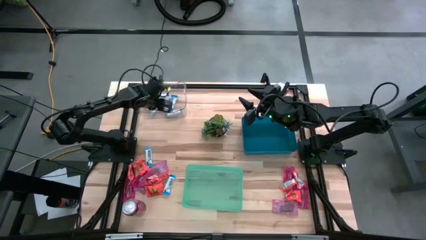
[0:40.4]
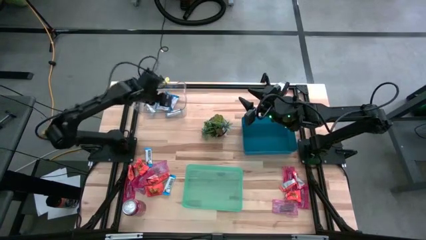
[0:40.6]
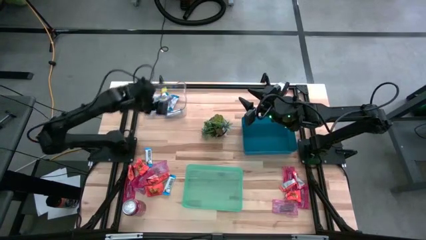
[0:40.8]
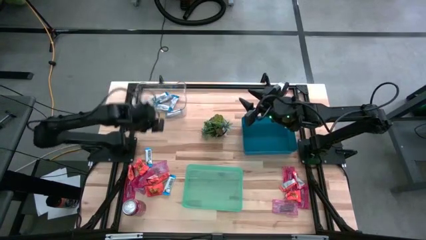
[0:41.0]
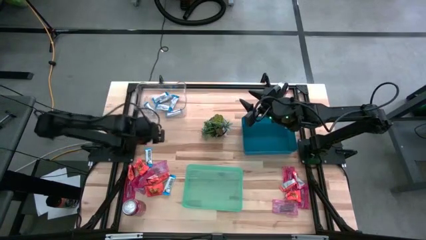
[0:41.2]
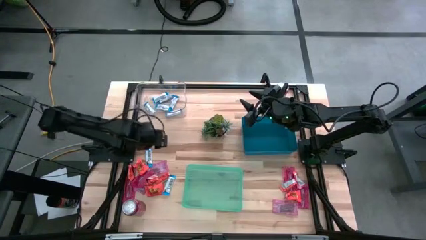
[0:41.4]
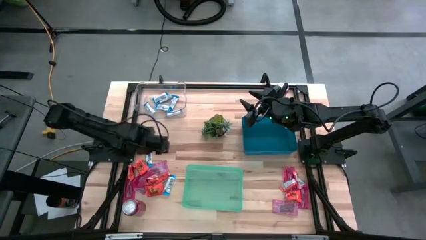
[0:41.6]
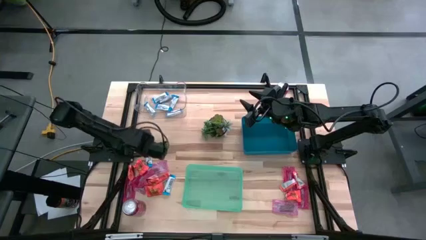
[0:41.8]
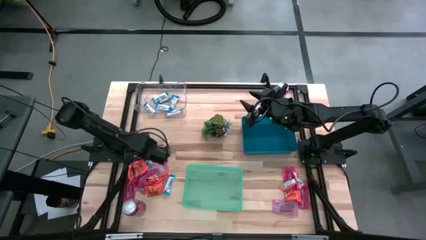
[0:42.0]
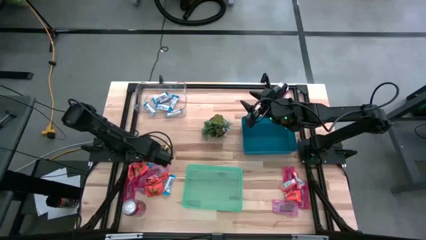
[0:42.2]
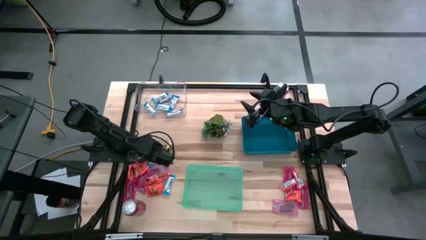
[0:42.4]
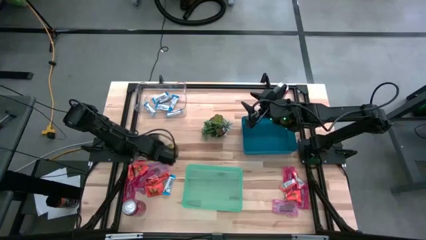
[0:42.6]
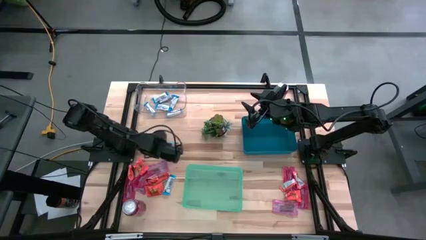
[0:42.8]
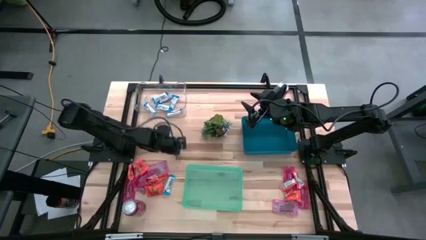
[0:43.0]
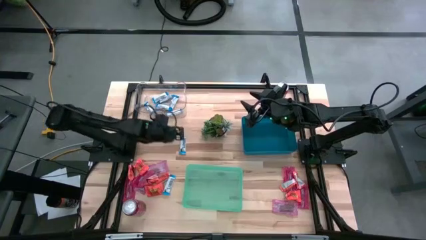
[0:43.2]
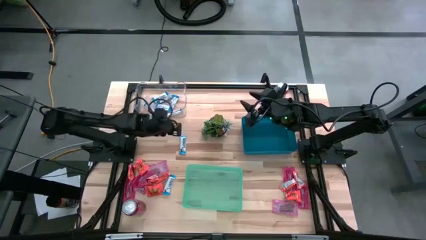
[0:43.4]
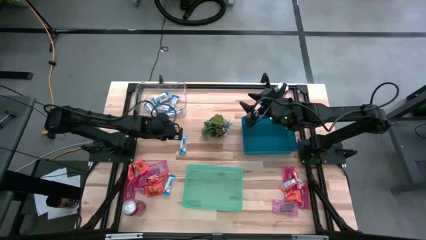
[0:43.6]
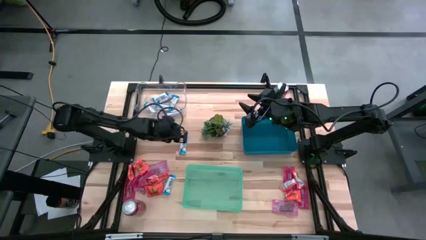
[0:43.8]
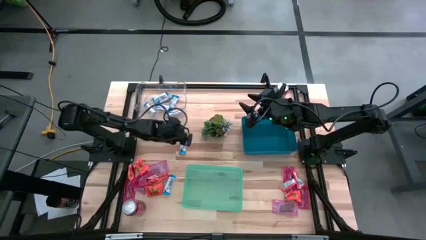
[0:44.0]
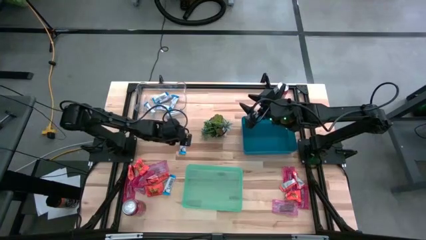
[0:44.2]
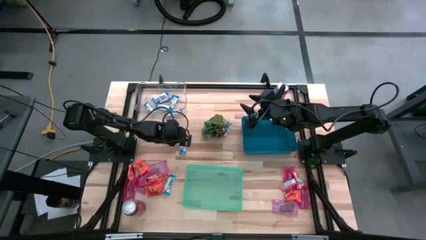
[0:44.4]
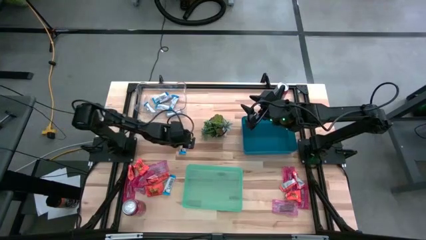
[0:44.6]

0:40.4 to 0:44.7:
Task: Sort candy
Put the white chocolate bar into the transparent bin

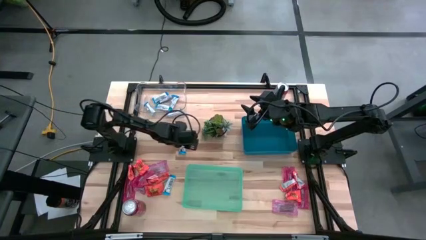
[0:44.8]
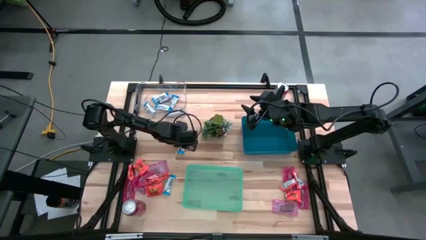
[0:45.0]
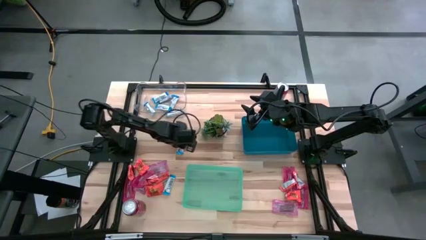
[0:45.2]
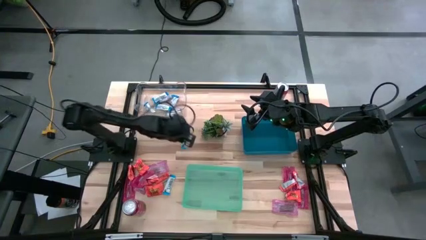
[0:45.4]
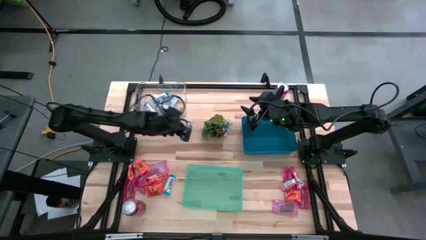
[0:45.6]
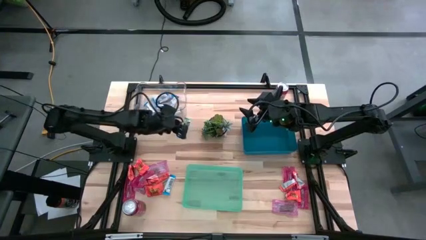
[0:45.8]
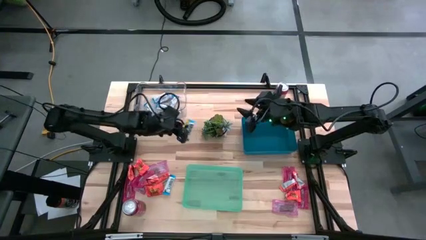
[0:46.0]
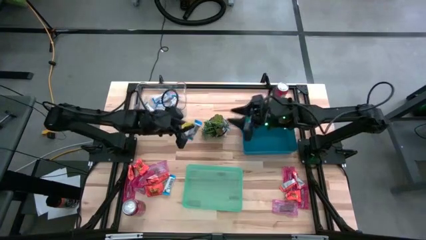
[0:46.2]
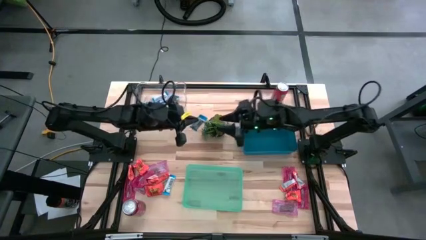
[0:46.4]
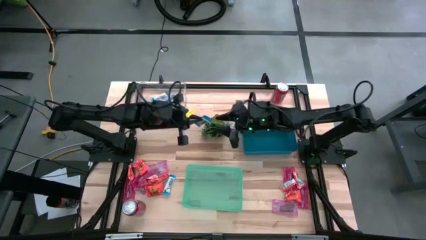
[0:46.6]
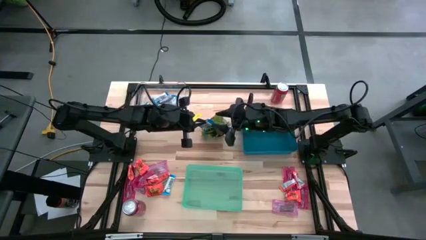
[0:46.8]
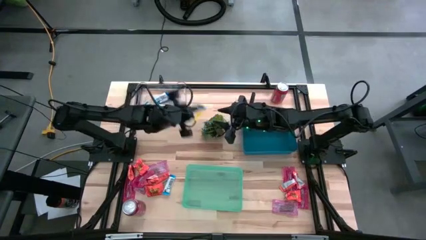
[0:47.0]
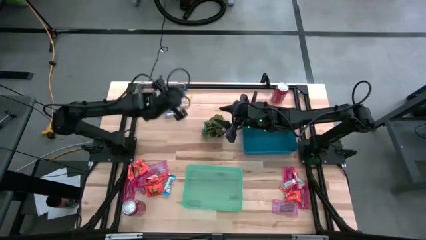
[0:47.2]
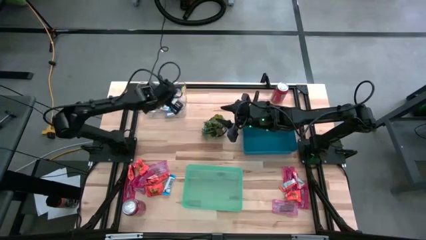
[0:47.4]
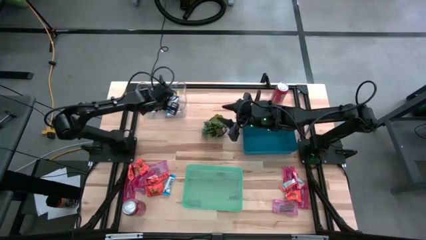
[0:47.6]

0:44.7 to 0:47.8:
Put the white chocolate bar into the transparent bin

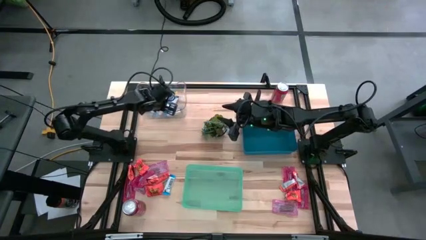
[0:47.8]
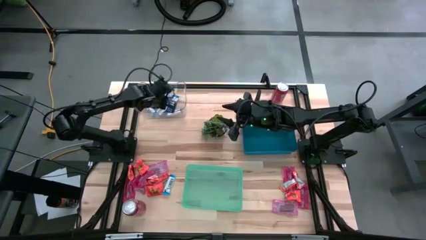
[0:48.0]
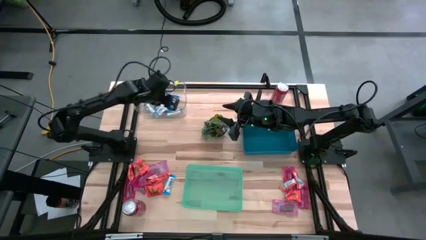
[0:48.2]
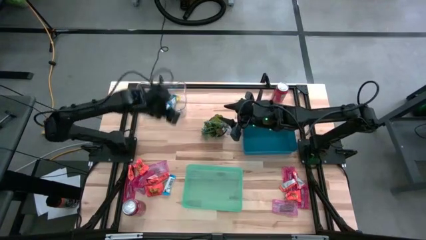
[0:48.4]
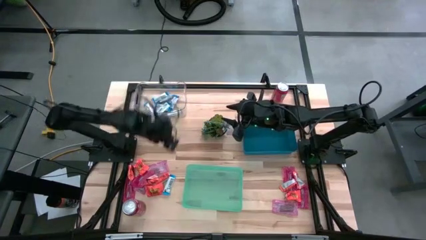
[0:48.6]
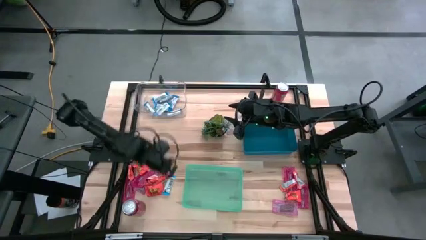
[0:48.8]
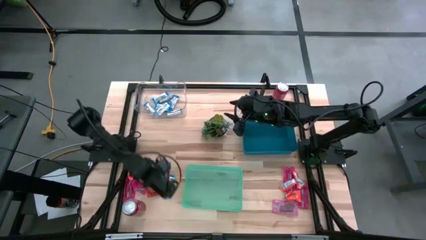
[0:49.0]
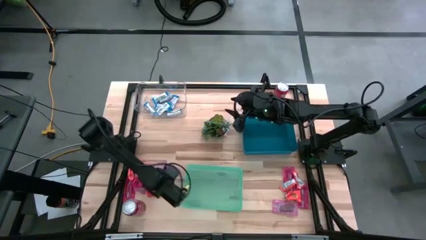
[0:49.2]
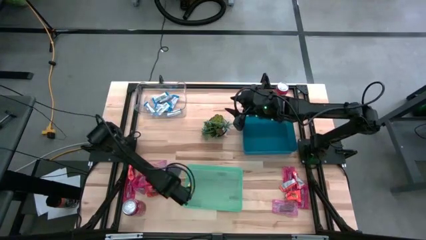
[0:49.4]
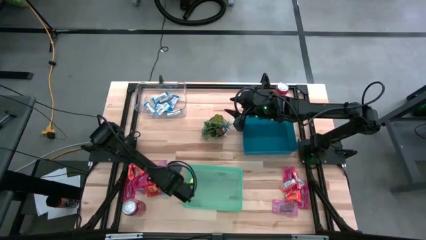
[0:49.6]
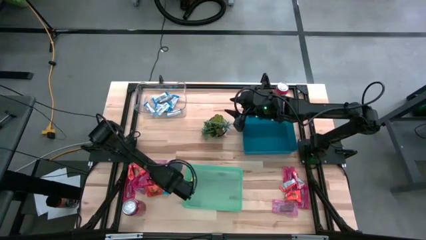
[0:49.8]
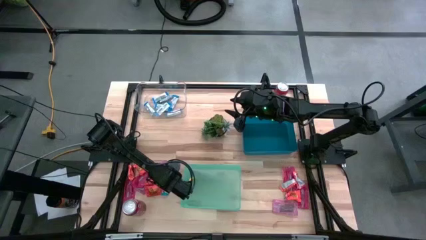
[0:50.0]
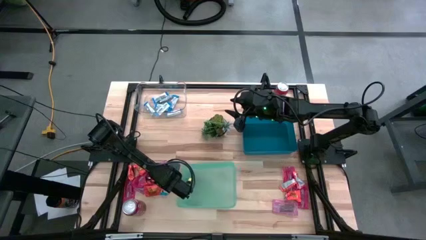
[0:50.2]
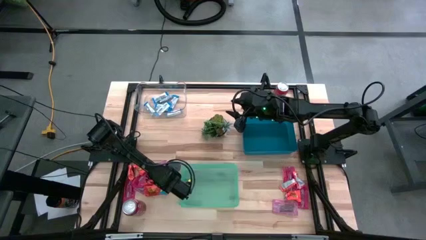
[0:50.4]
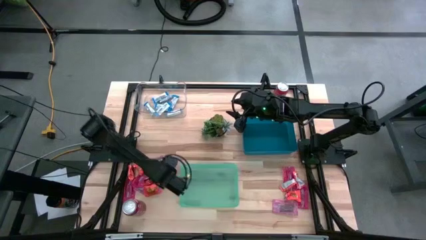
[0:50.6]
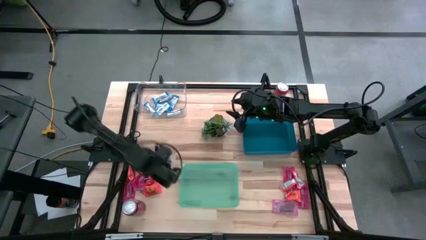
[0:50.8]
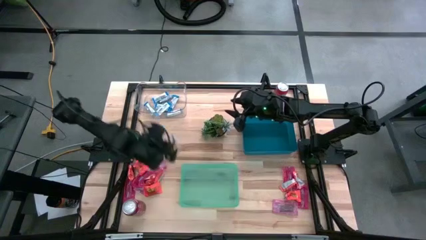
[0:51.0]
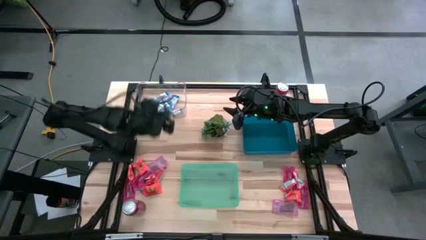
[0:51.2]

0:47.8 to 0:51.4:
Put the white chocolate bar into the transparent bin

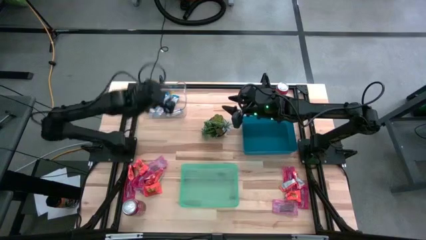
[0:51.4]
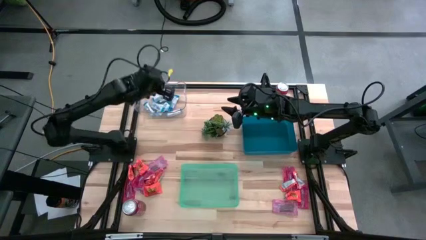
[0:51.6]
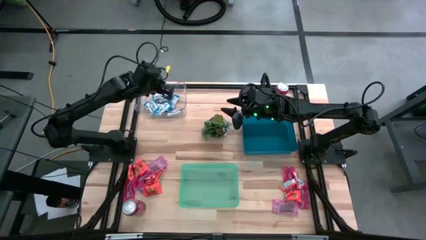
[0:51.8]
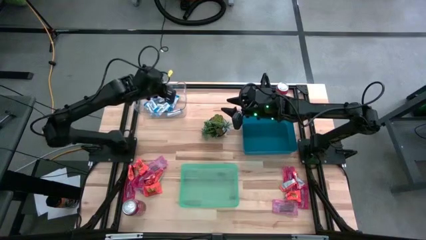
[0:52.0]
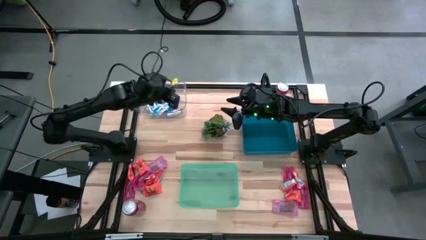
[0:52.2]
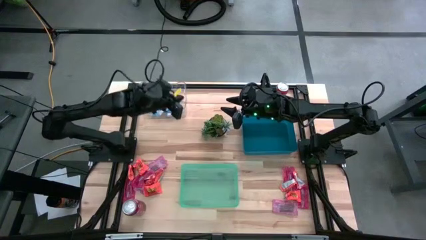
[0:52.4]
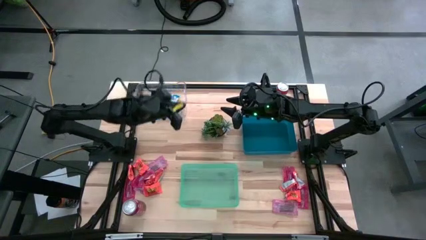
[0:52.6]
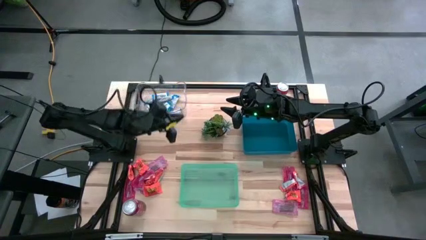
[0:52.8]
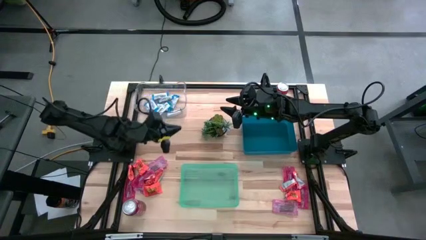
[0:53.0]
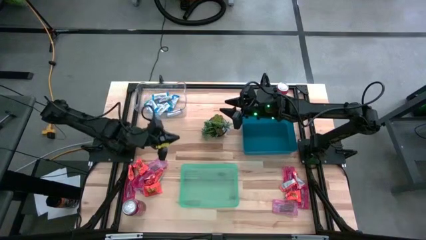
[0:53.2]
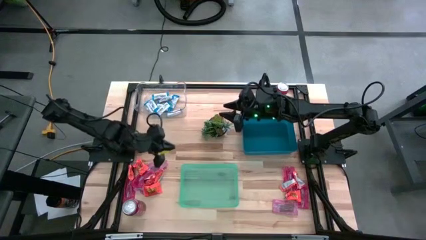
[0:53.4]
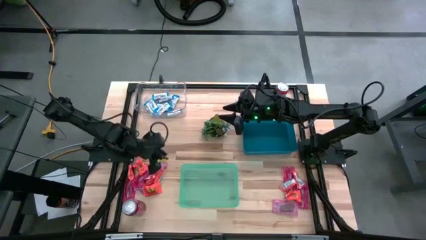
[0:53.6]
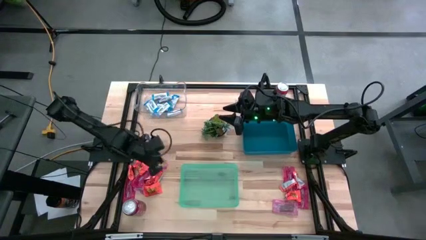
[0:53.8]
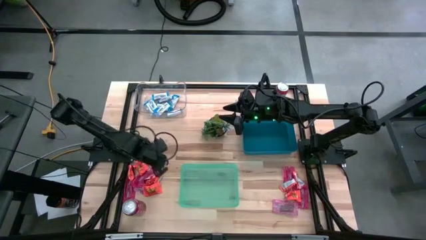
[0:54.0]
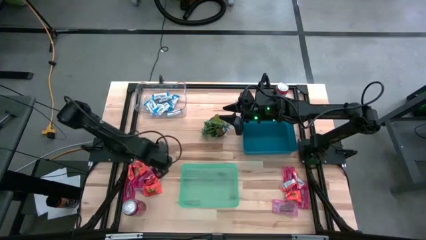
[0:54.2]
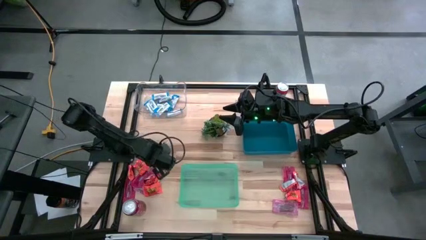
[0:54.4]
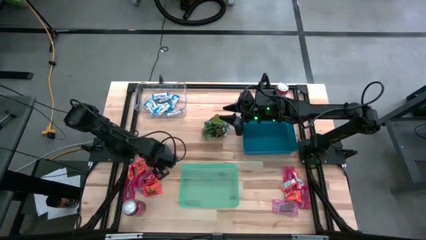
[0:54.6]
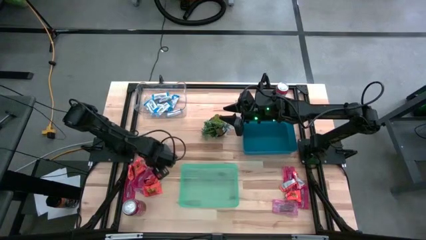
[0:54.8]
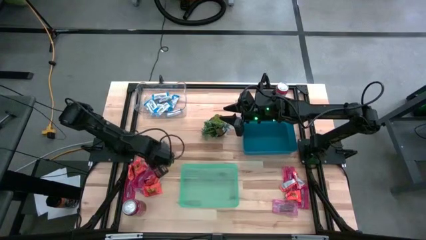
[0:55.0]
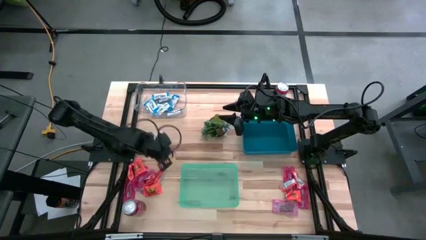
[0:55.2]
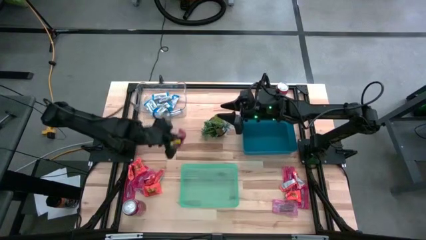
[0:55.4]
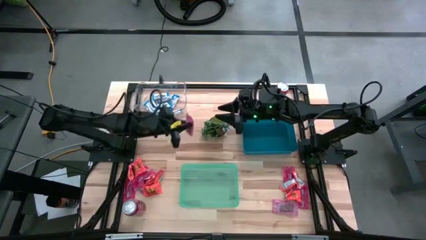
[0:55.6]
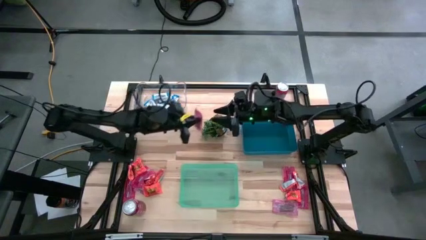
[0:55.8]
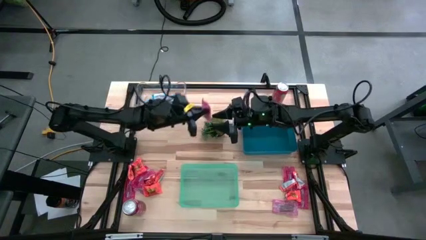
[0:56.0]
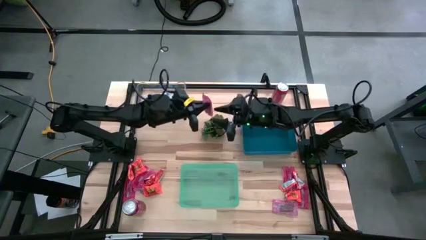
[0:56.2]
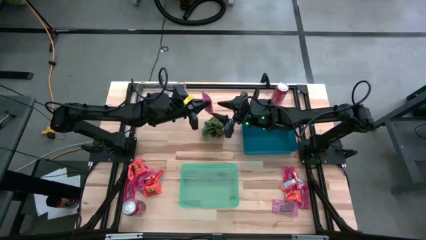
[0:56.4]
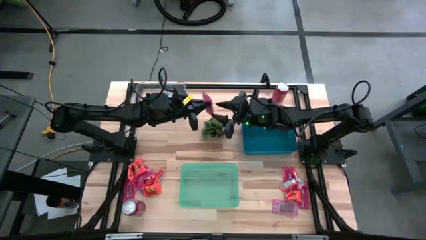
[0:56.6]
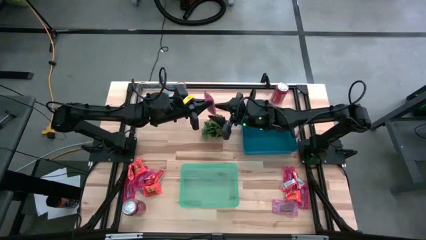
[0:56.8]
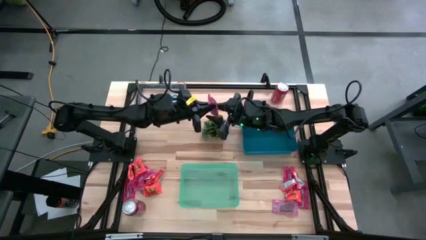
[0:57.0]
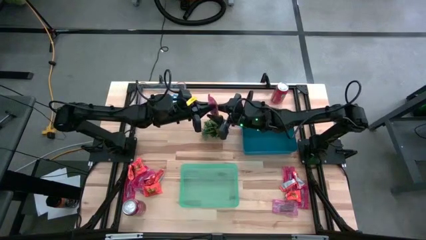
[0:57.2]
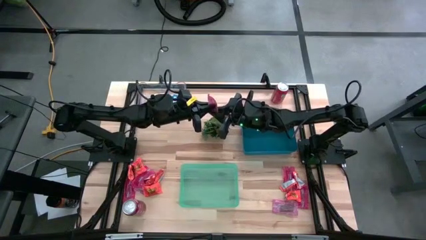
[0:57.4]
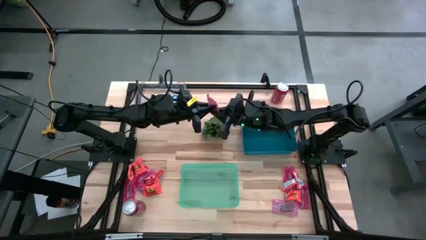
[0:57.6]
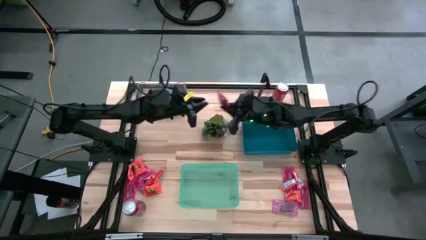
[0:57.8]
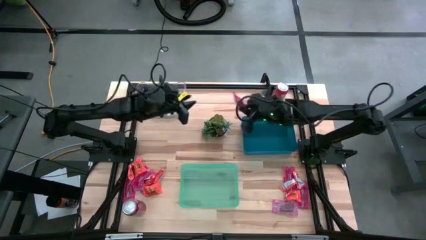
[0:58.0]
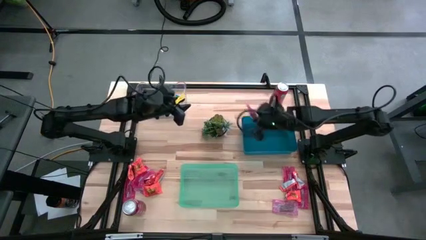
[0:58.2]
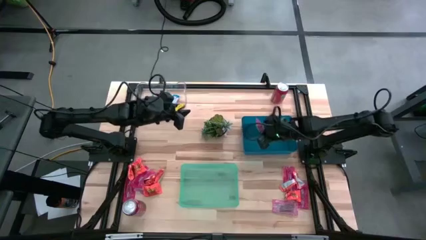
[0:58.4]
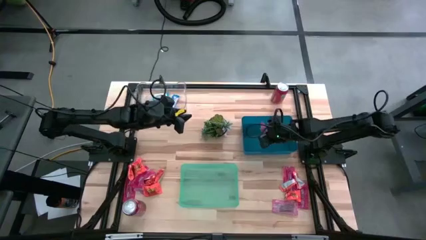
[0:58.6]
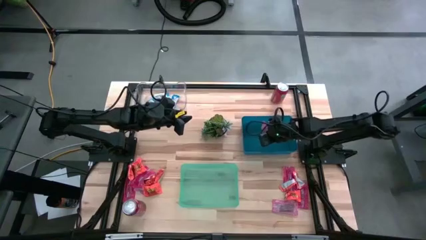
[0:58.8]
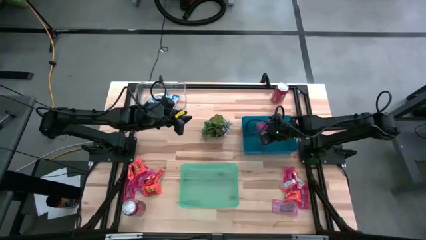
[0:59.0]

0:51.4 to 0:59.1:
Put the red candy into the blue bin
